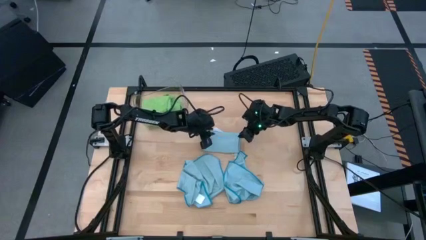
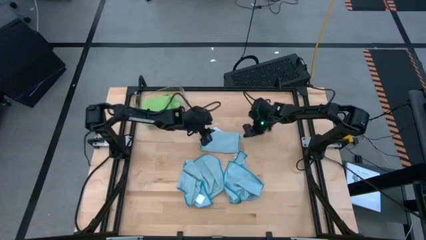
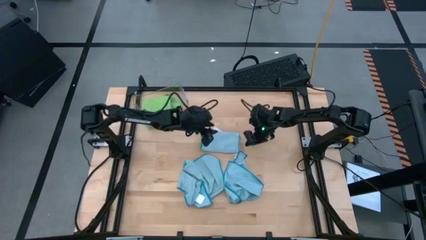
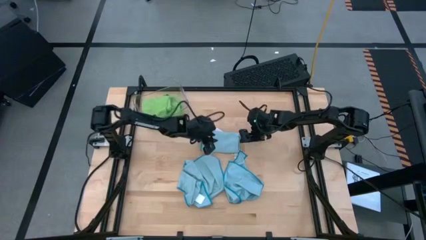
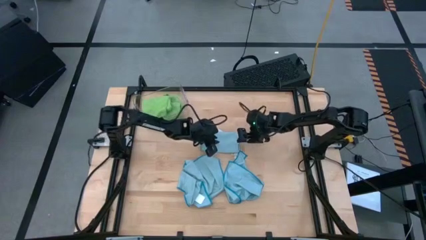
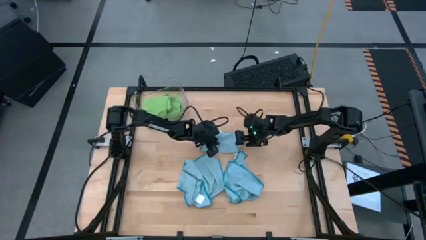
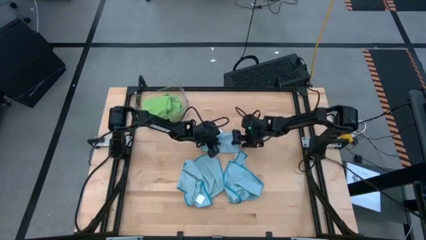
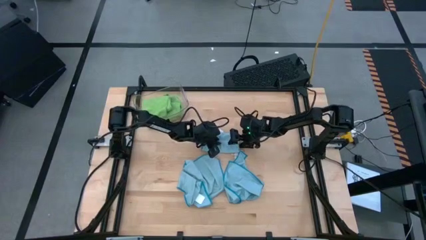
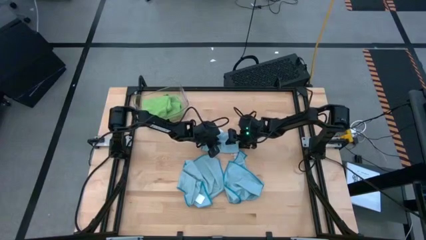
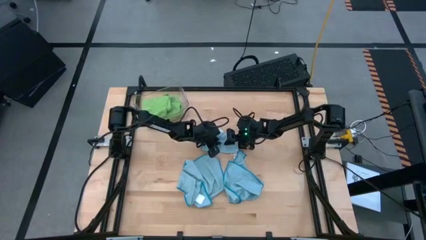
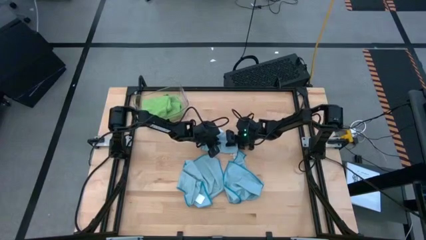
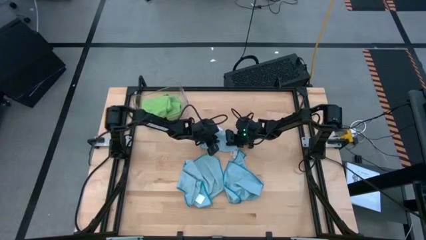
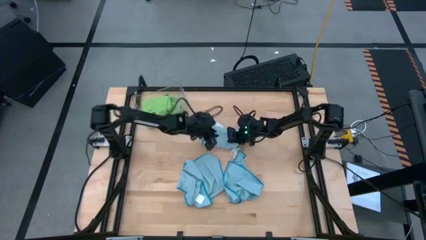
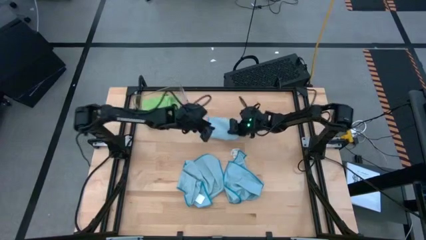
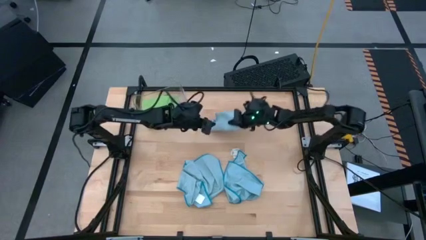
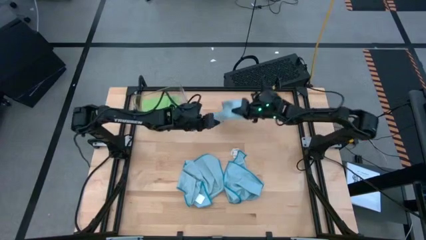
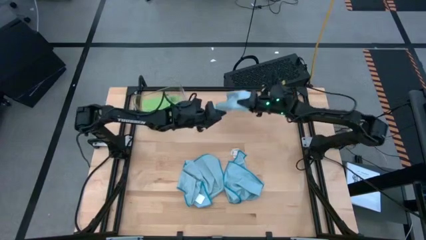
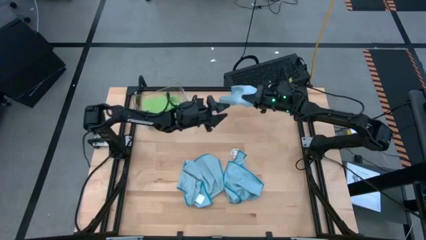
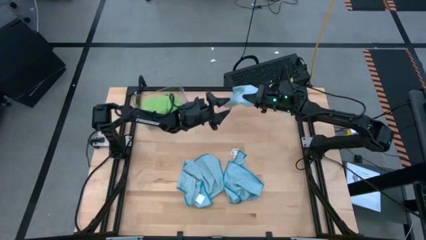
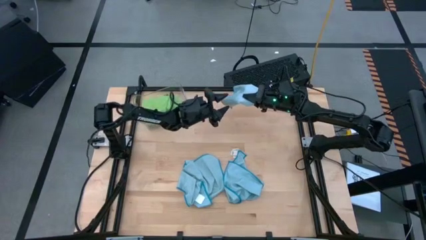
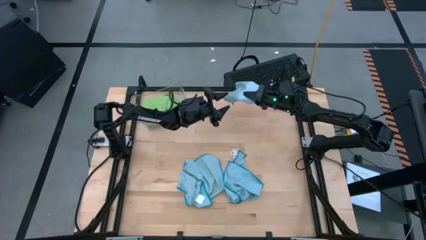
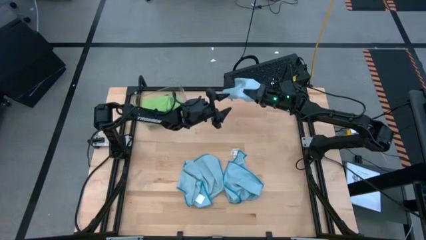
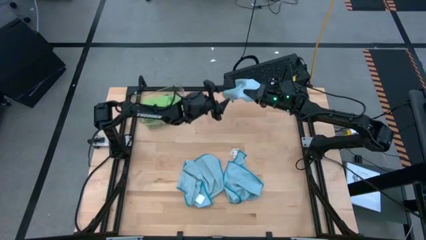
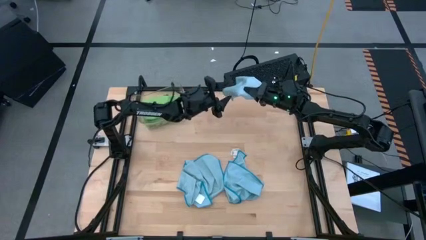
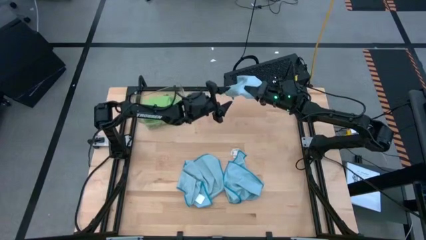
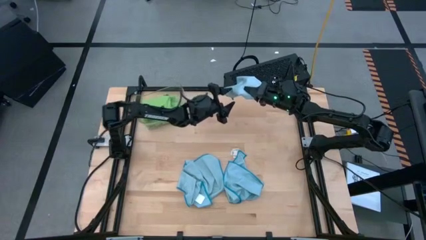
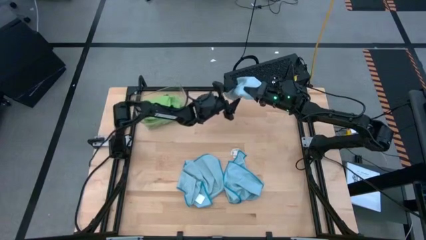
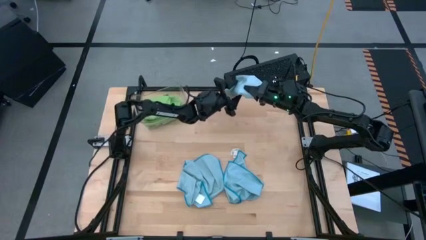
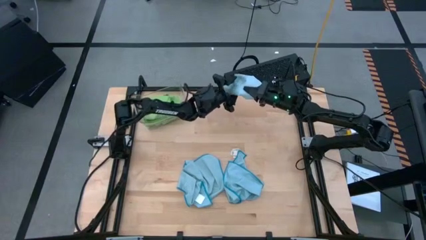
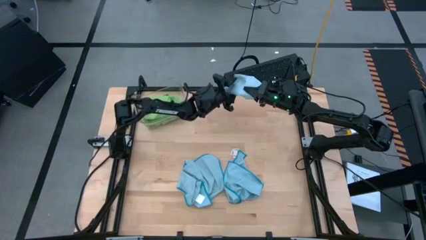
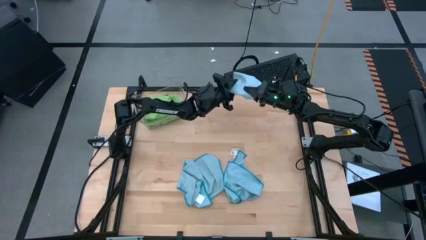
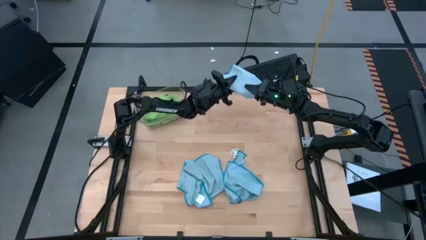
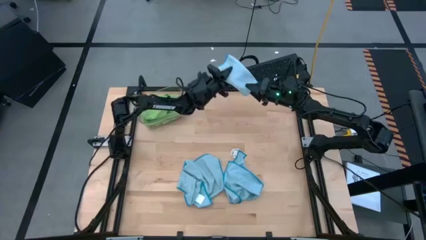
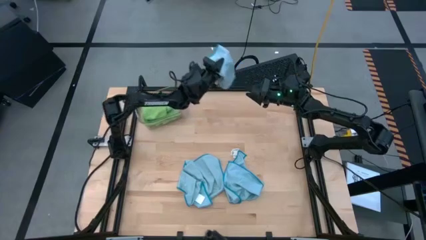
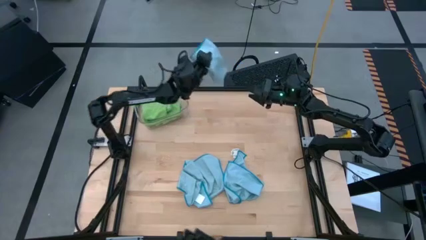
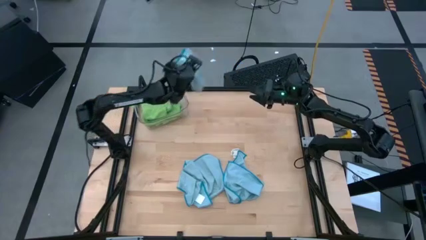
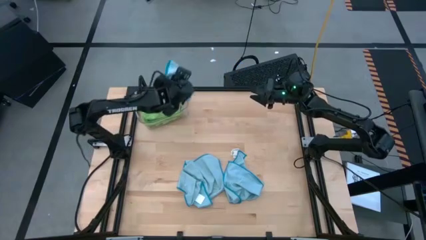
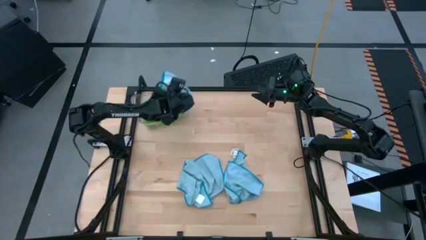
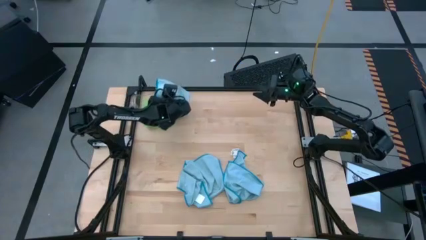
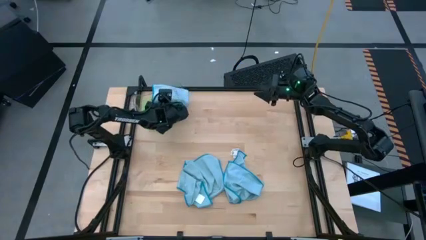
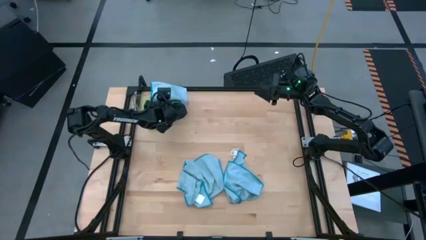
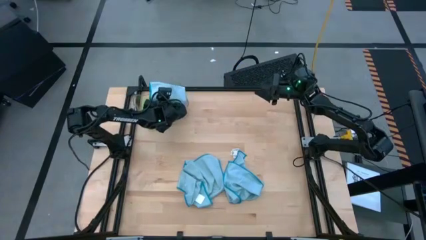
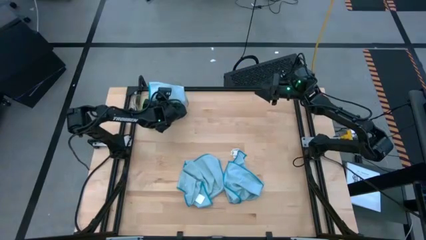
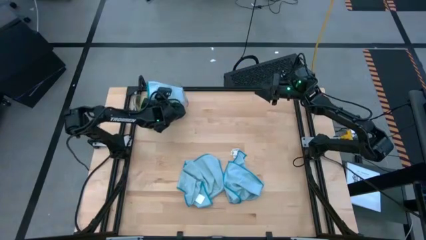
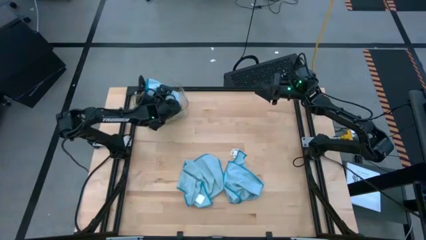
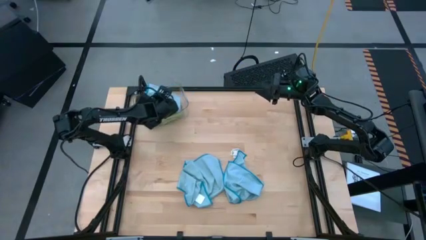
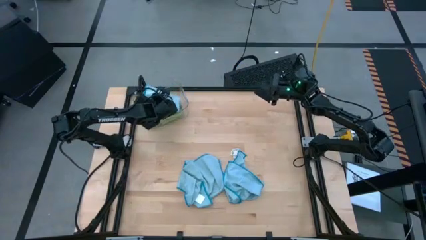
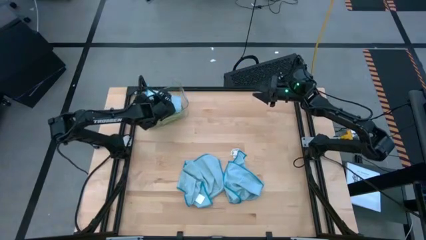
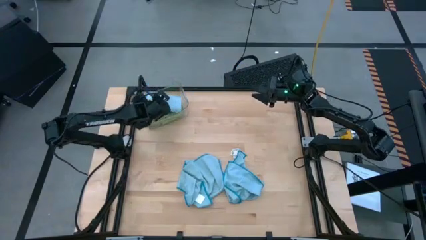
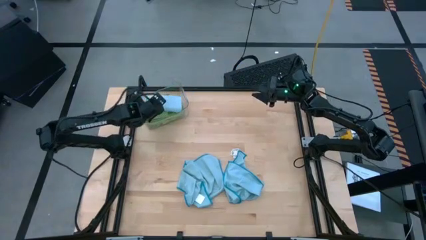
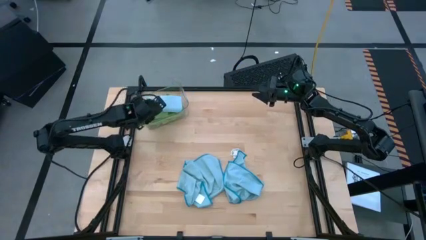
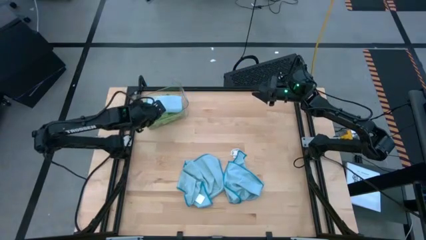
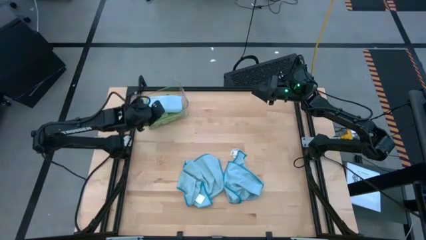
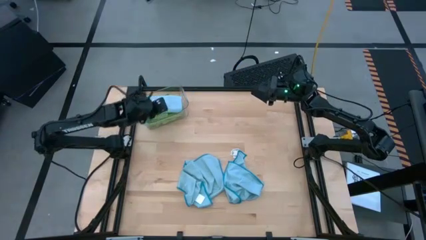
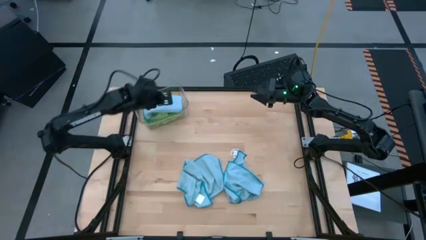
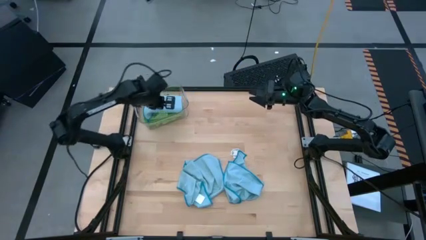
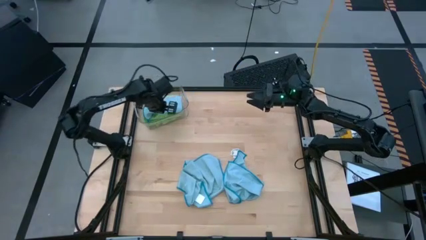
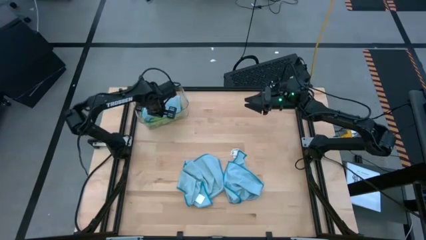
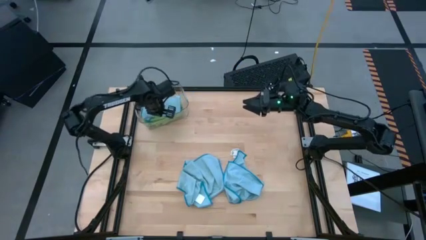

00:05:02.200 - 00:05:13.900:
Task: Fold microfiber towels
Stack the folded blue microfiber cloth on top of the green microfiber cloth on the transparent bin

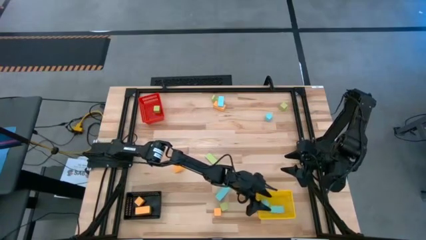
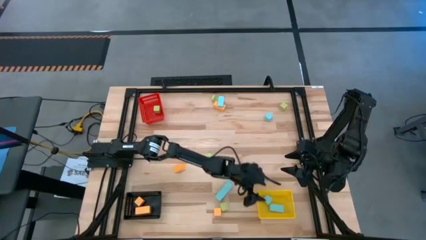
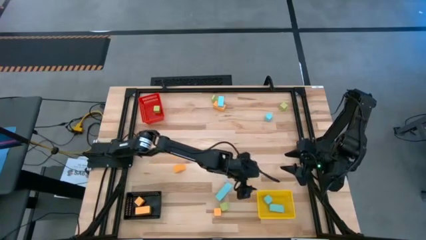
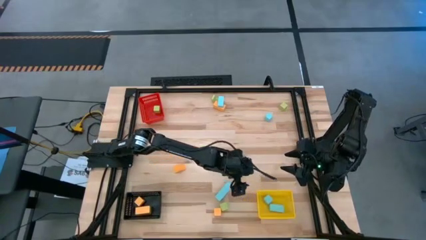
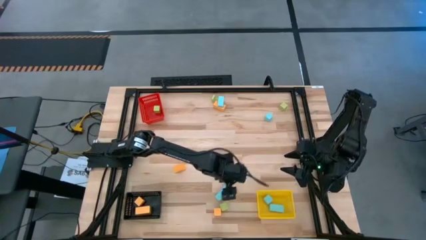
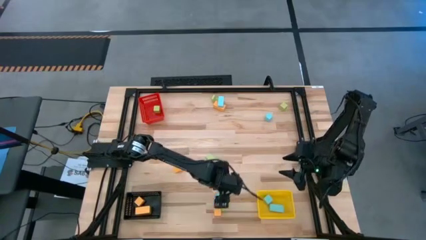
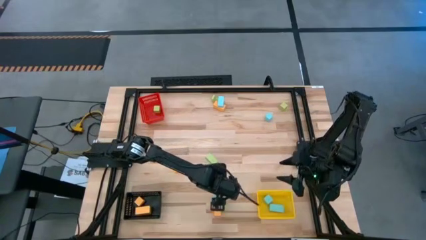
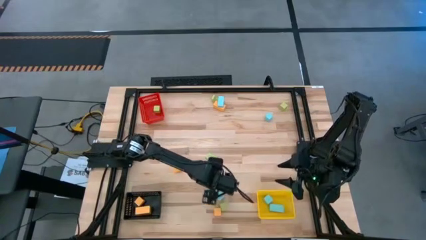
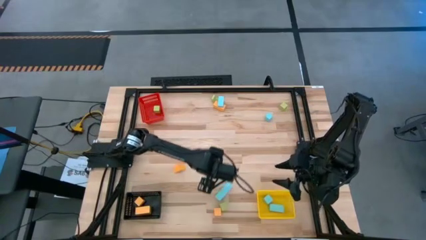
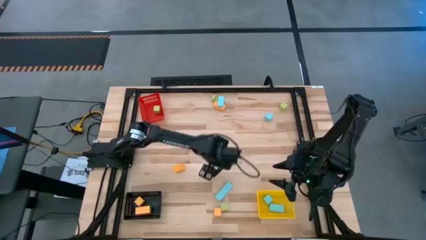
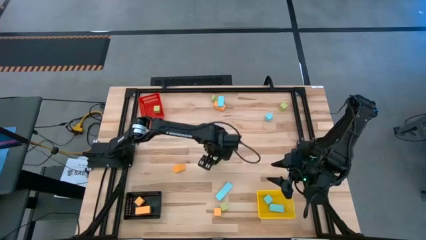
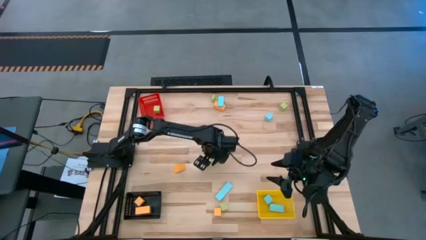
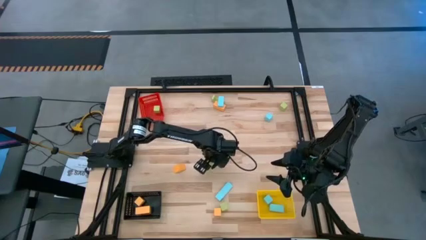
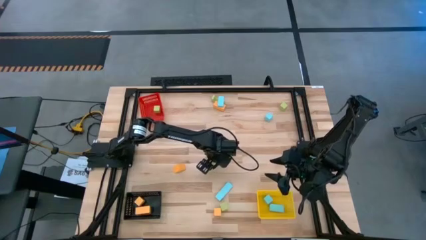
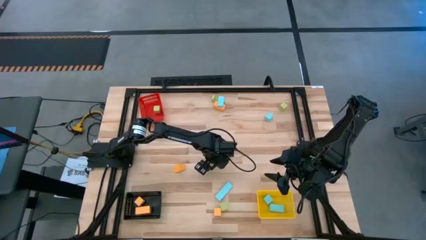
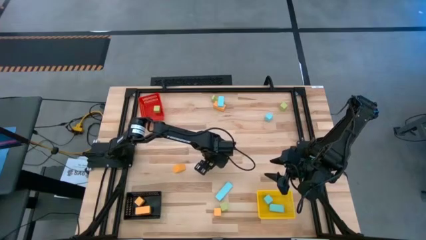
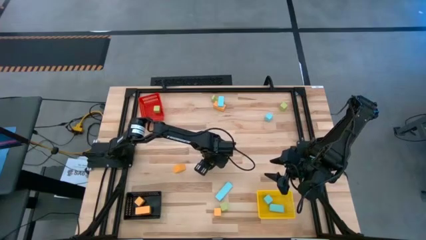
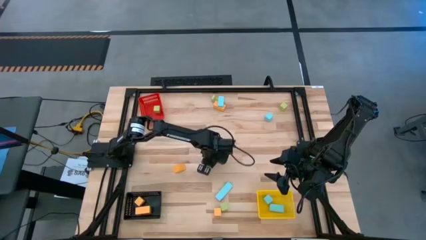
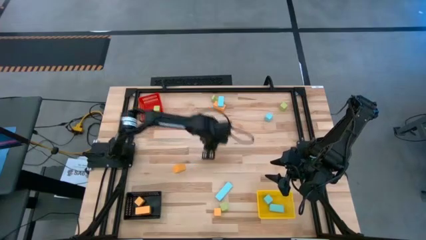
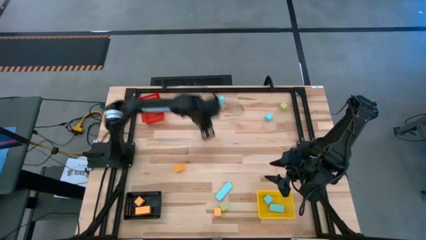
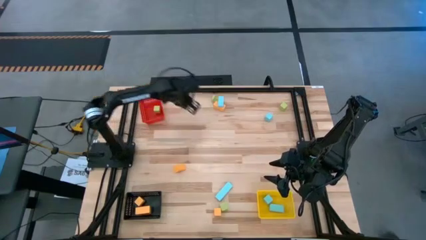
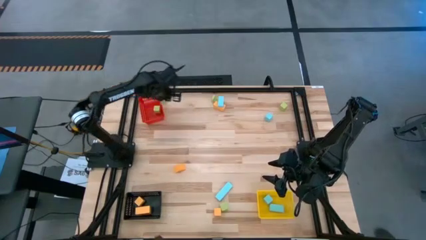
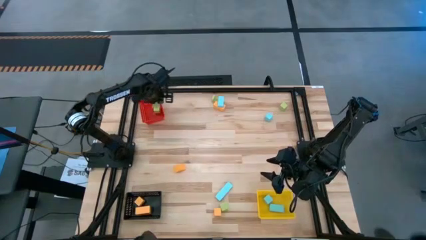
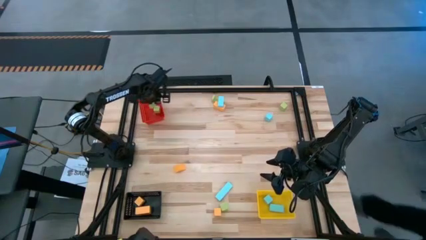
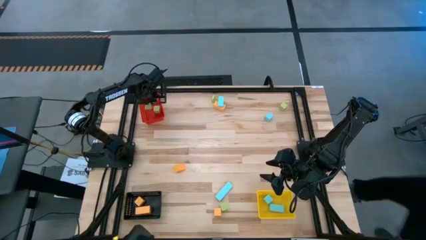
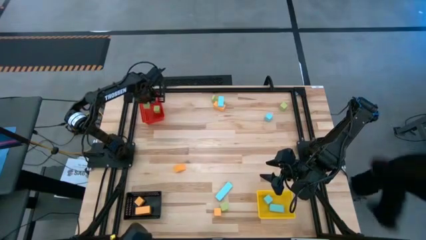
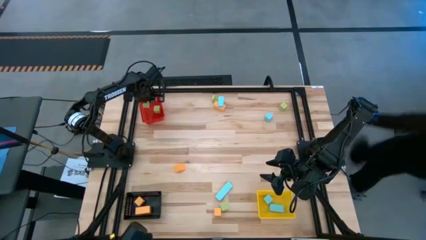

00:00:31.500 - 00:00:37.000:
Task: Sort & place blocks by color
Put the green block into the red bin
